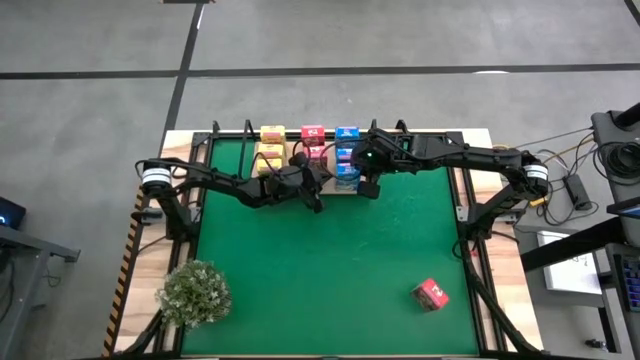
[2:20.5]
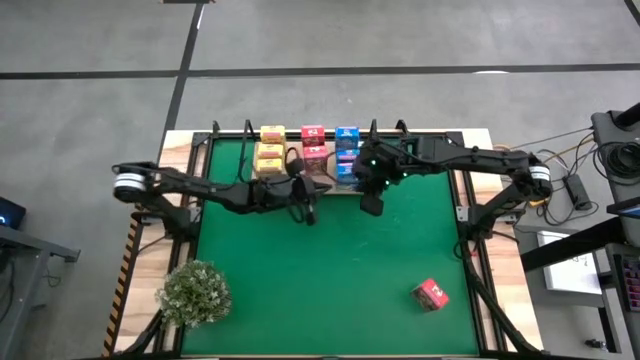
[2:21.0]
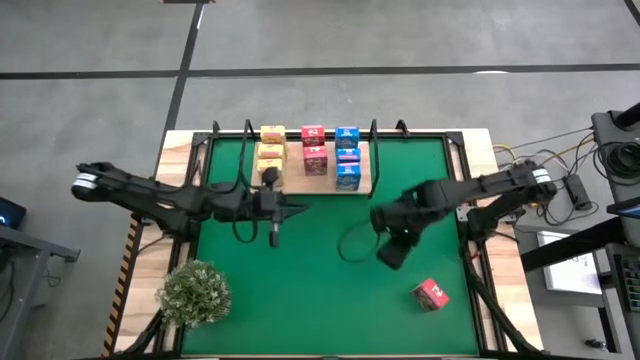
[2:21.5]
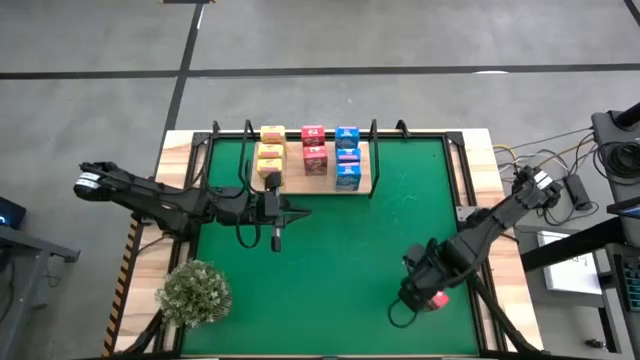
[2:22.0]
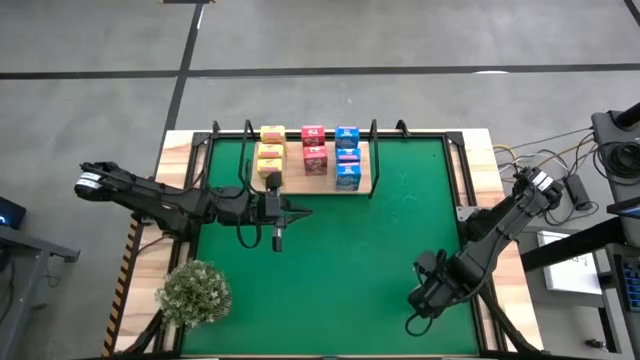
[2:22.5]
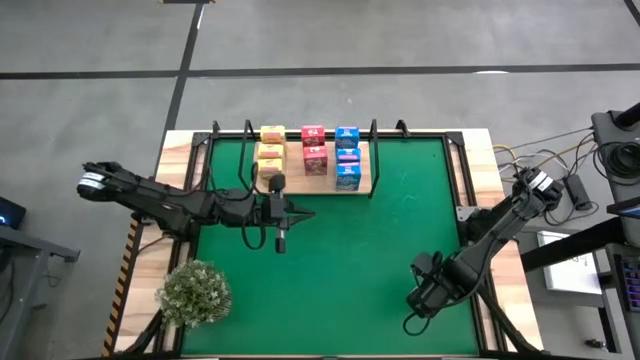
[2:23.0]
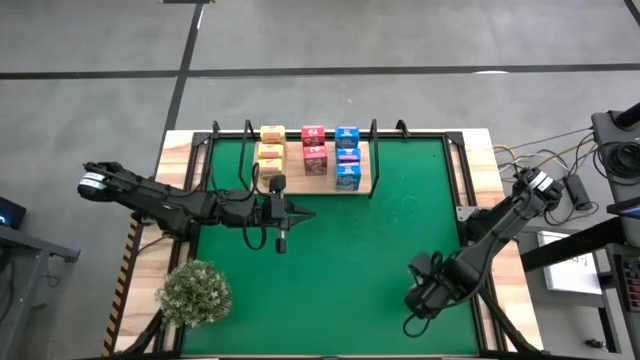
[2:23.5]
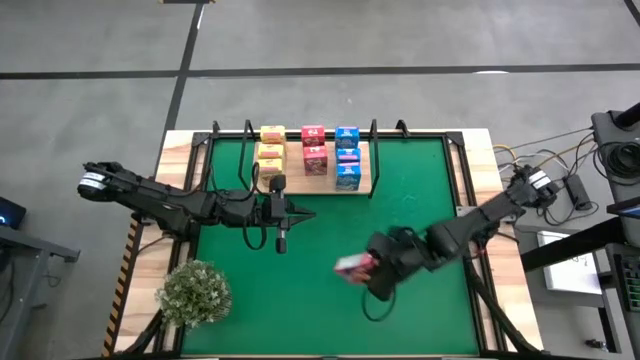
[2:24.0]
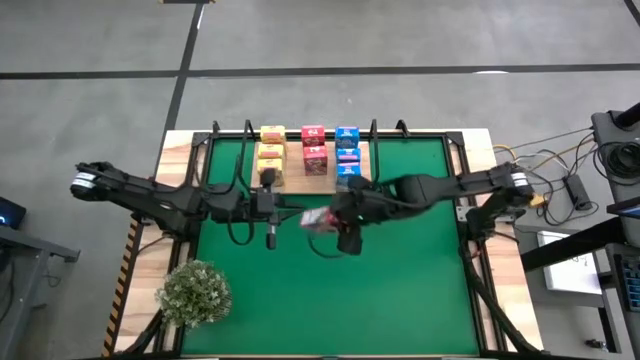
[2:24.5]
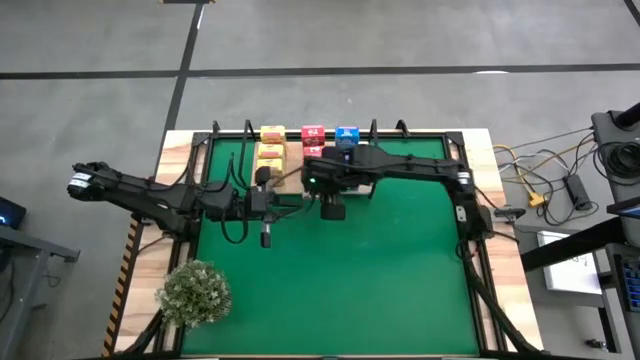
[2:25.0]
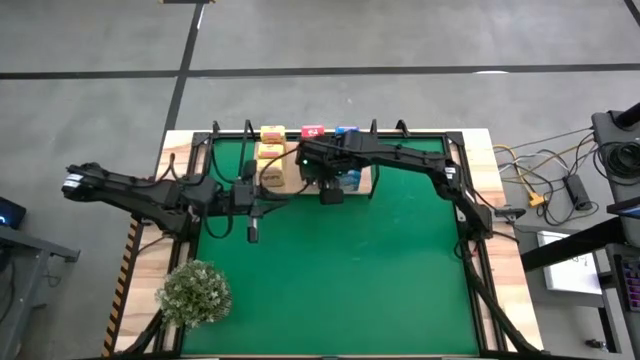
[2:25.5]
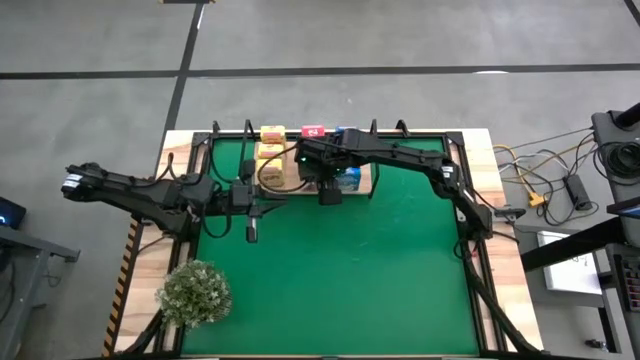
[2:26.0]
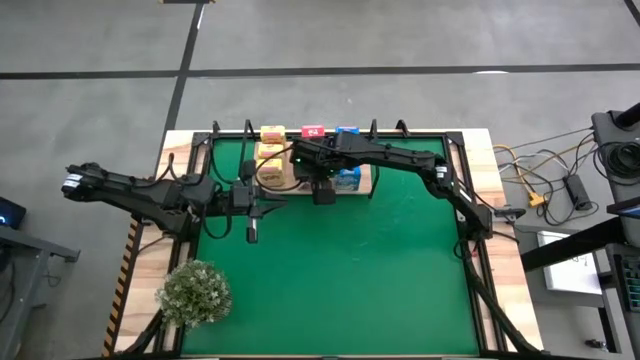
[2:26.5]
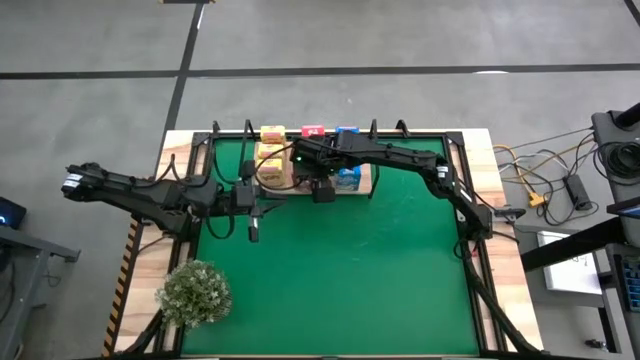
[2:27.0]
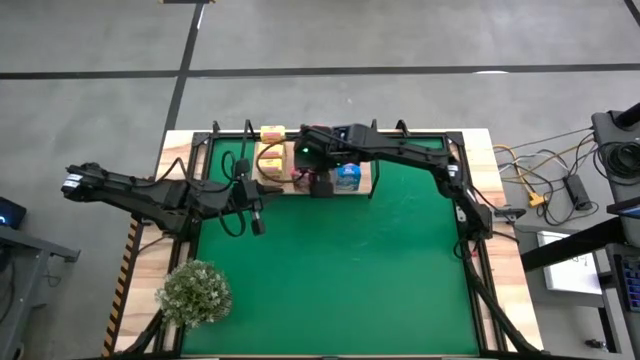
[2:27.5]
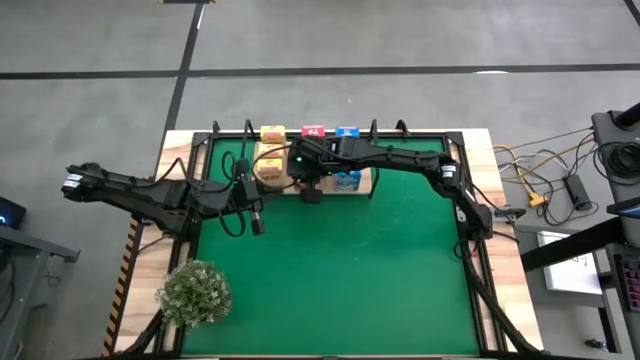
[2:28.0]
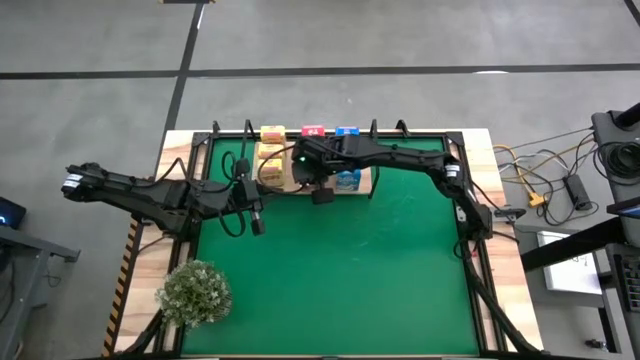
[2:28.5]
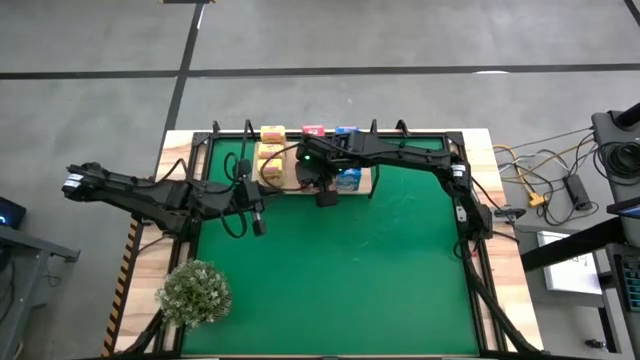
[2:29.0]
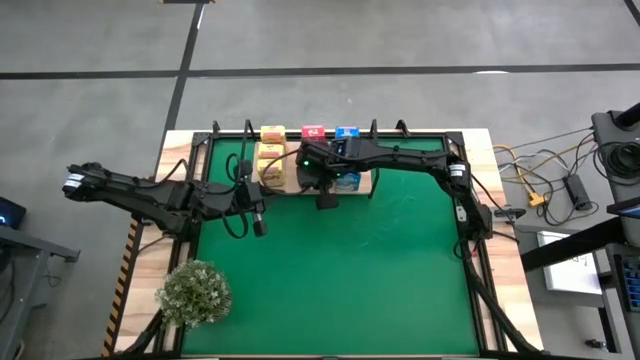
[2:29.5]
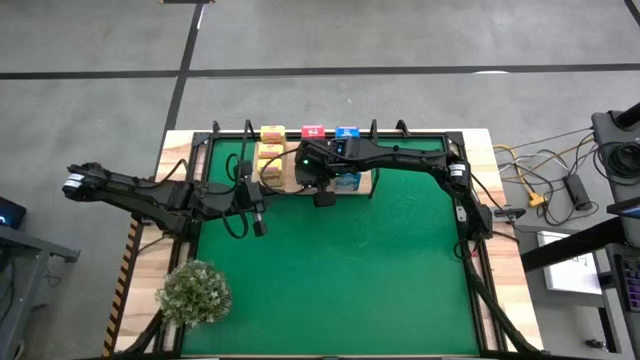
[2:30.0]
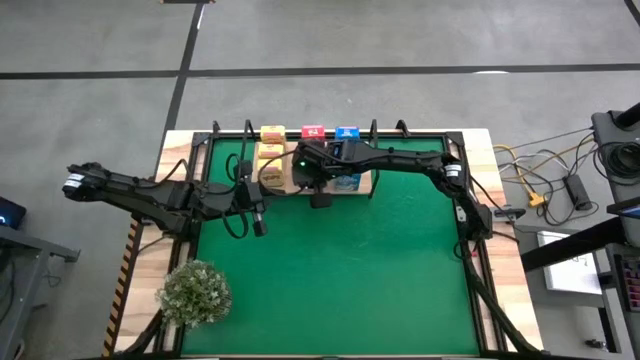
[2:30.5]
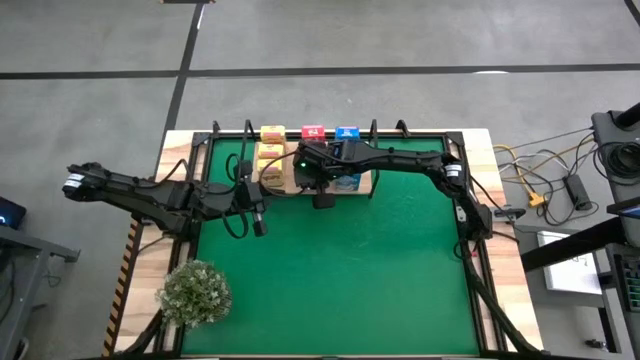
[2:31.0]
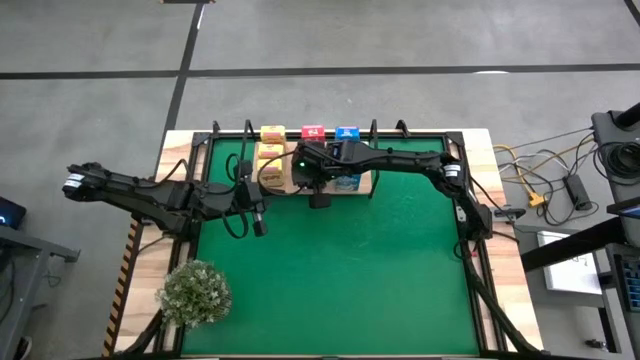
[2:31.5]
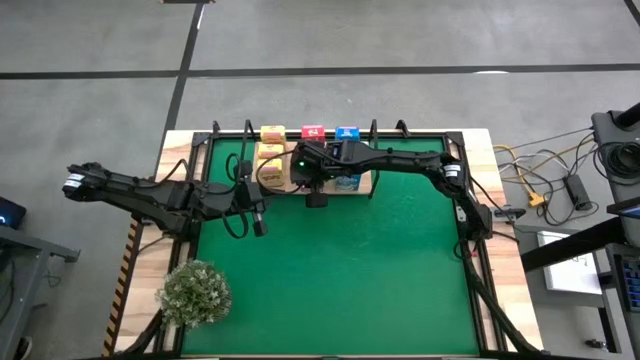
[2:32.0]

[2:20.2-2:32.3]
Task: Stack cereal on shelf
Put the red cereal box on the shelf aligned with the red cereal boxes

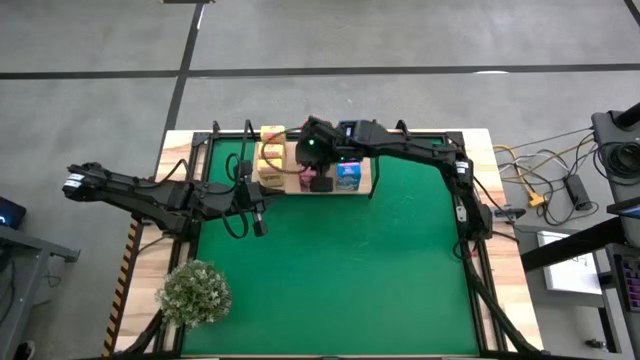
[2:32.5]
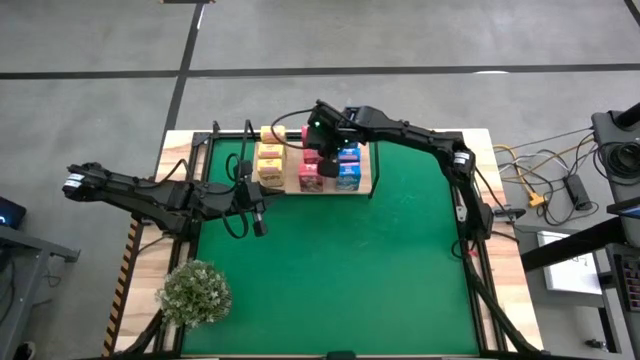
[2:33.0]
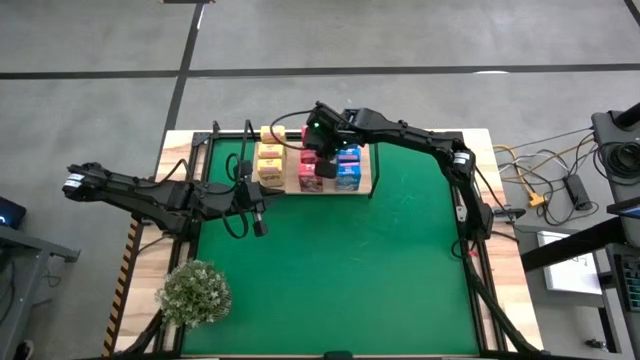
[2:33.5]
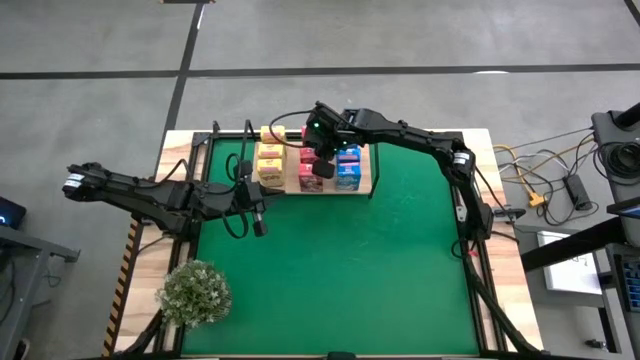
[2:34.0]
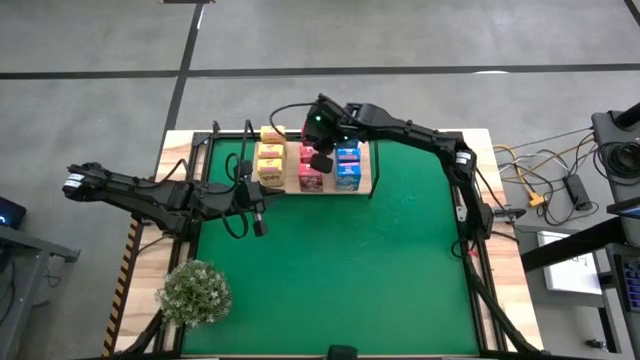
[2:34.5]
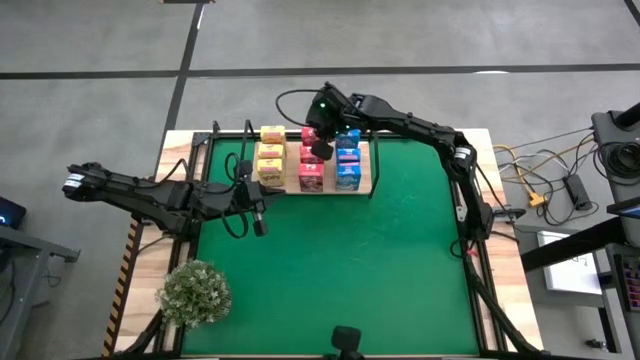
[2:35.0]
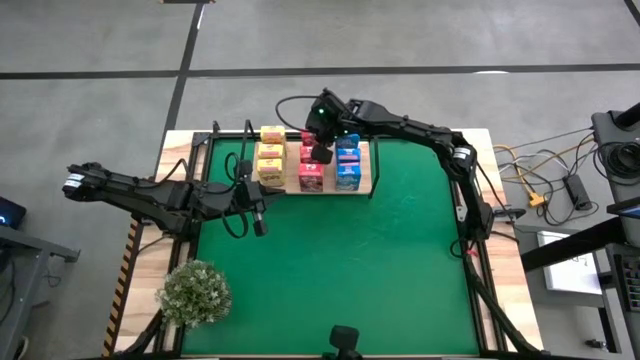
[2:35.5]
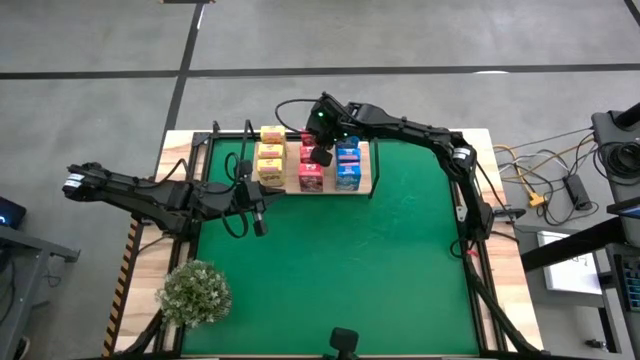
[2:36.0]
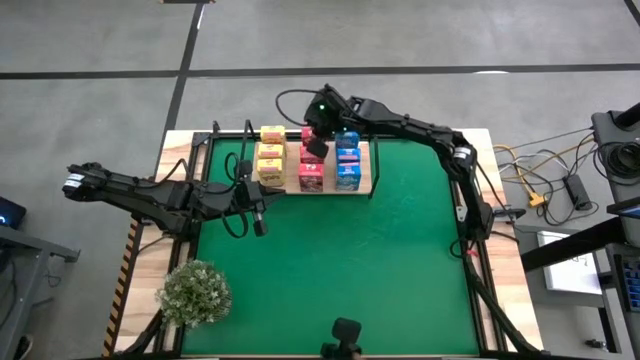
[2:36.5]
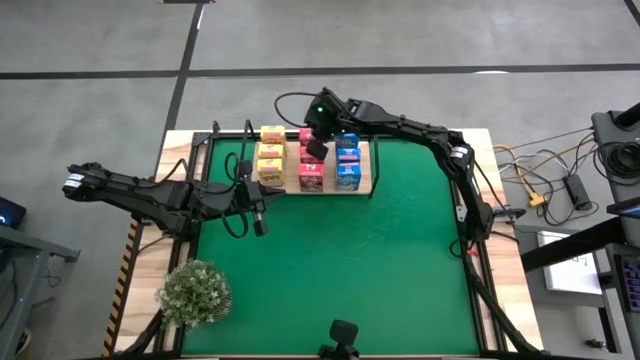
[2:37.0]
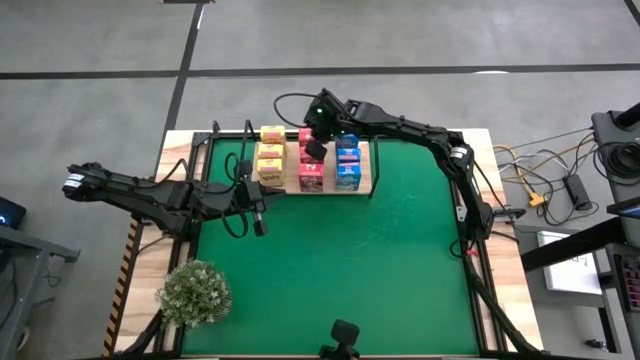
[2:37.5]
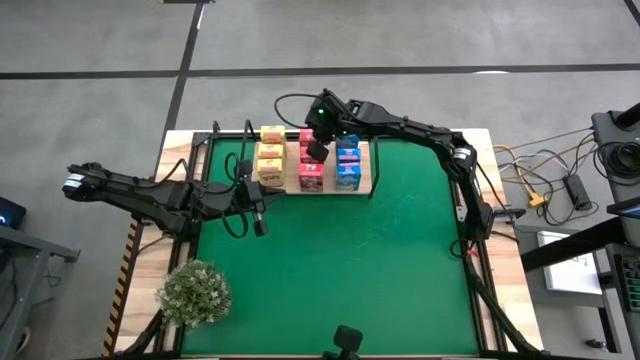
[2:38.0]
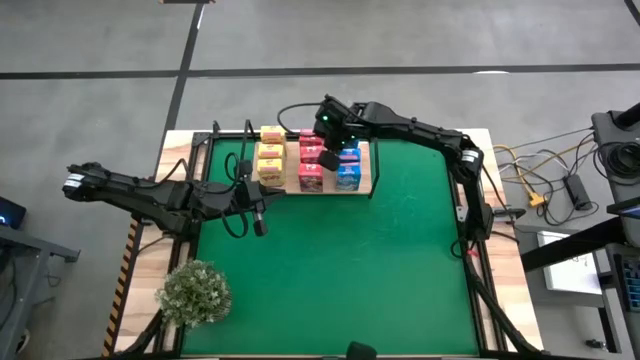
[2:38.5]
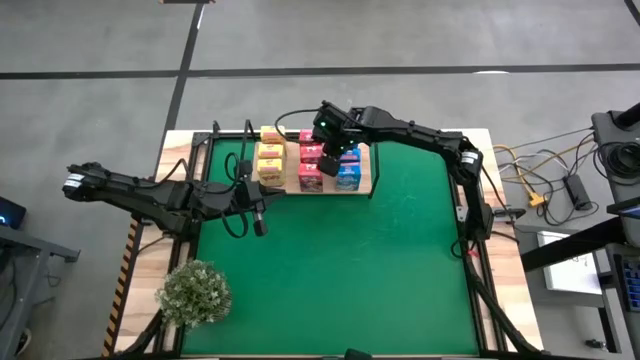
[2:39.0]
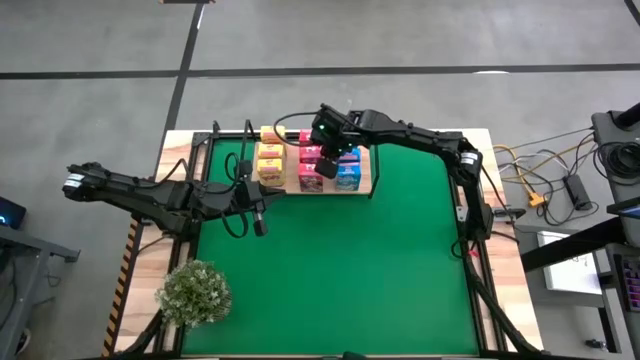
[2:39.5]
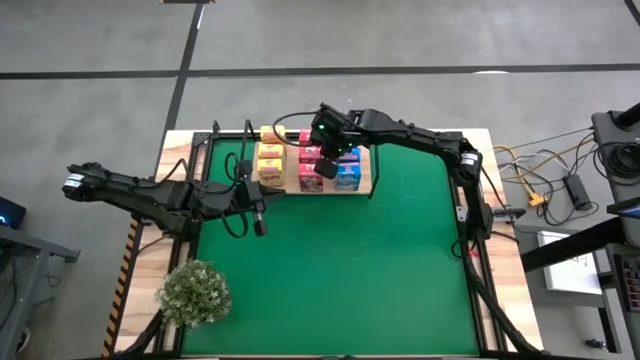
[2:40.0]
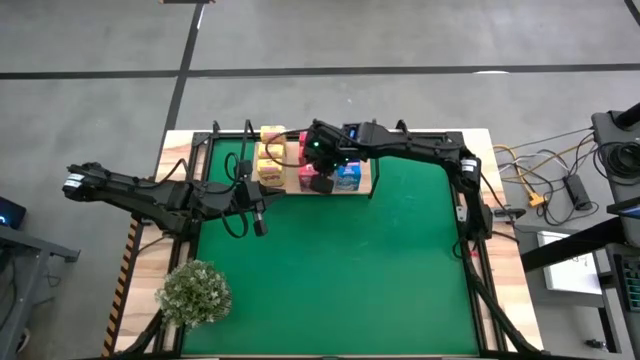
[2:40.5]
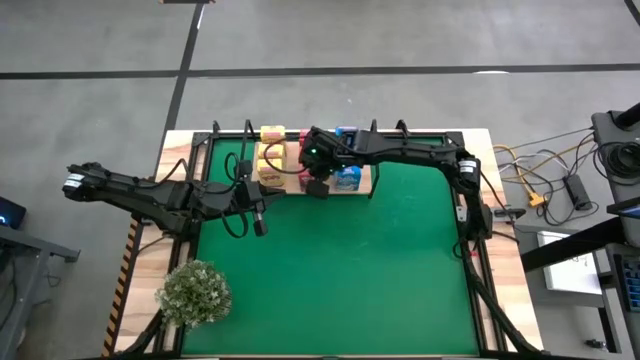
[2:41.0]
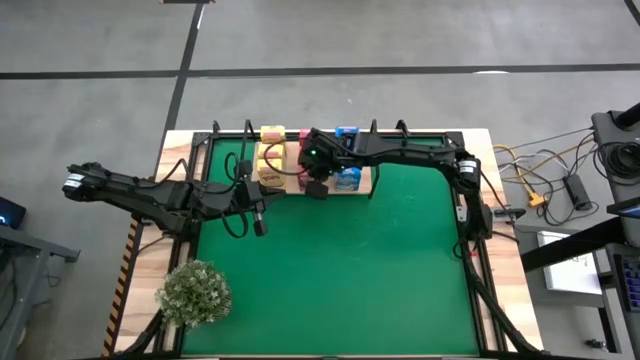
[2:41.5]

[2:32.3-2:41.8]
Adjust the red cereal boxes on the shelf
